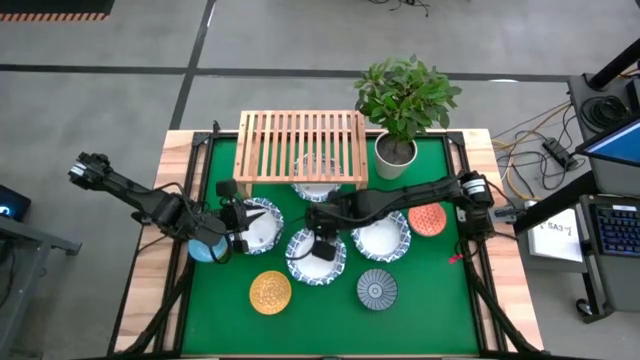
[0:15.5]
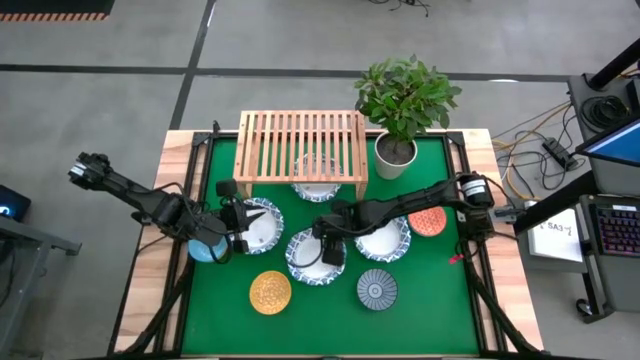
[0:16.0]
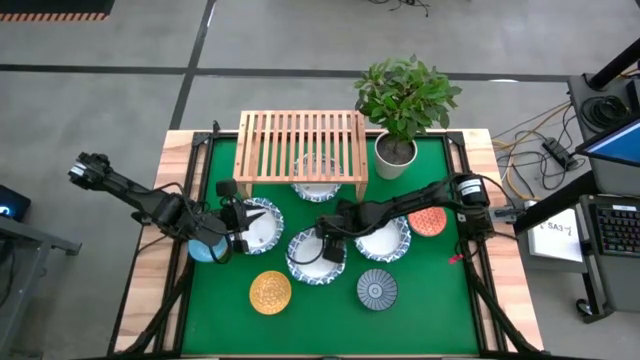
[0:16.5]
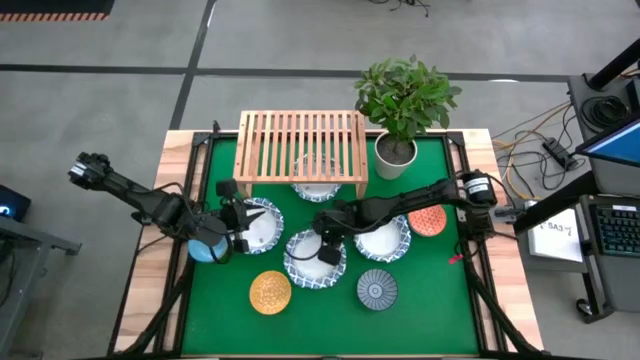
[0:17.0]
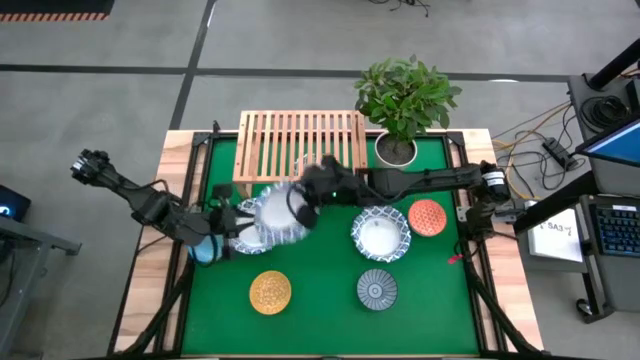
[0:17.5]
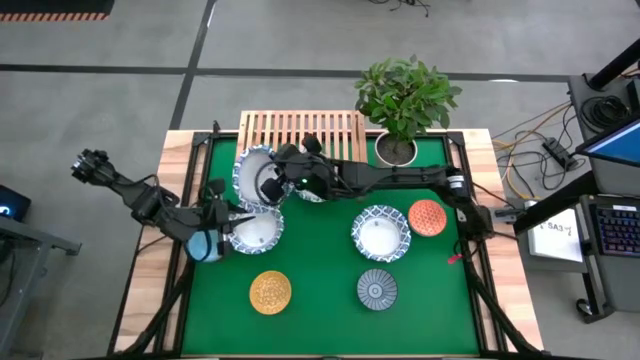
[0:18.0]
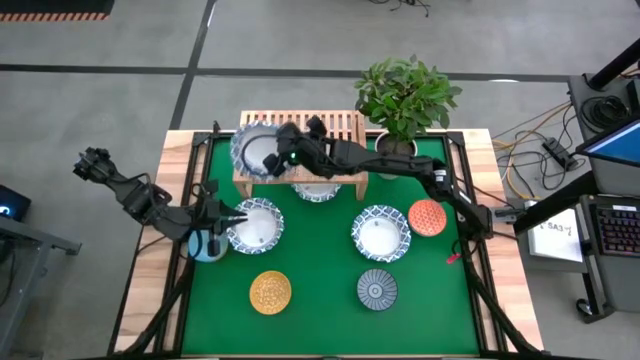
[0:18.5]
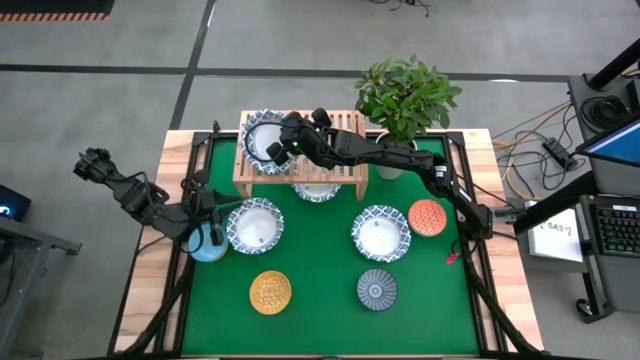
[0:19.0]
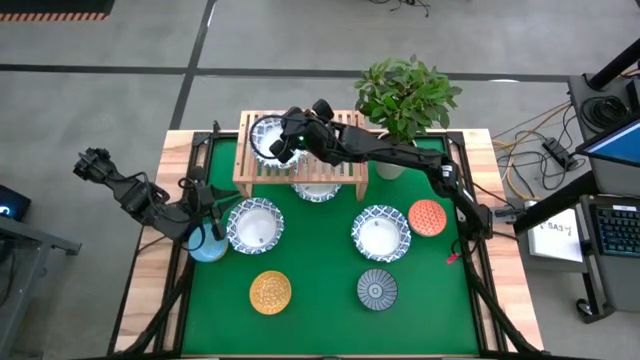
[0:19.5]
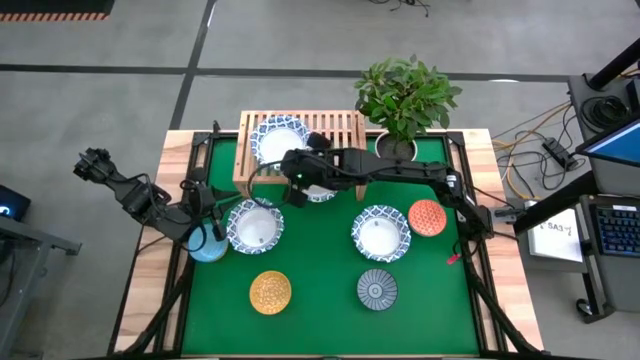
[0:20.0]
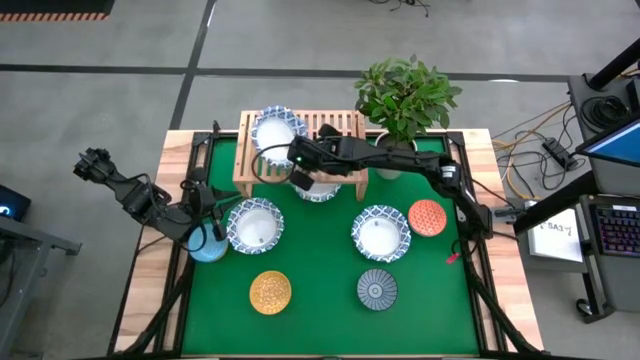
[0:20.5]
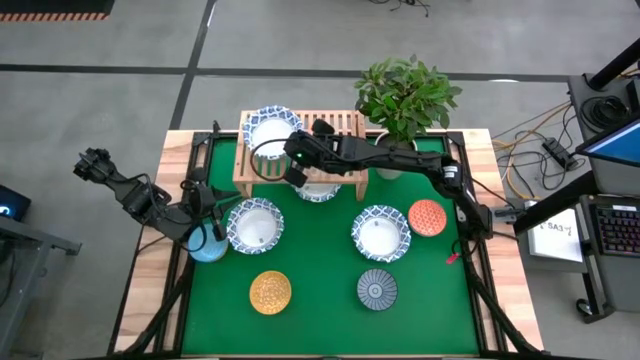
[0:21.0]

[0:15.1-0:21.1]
Task: Place and stack bowls onto a shelf
Put the white bowl on the shelf

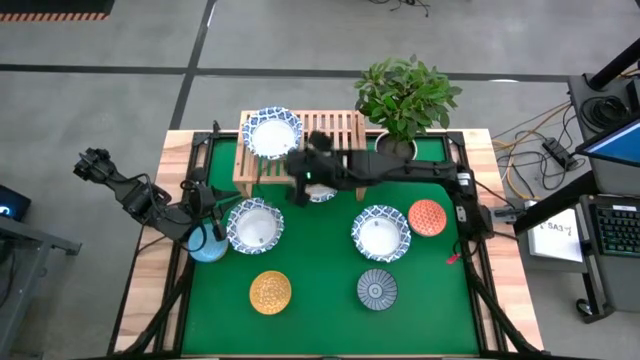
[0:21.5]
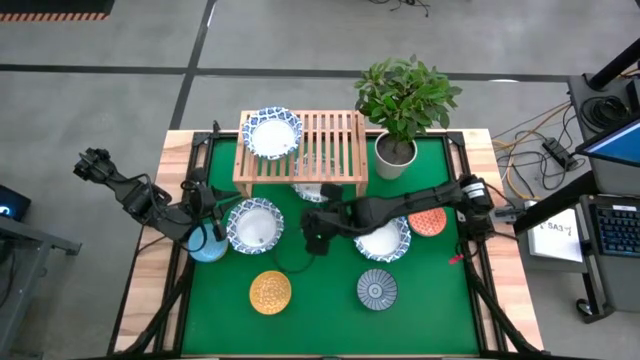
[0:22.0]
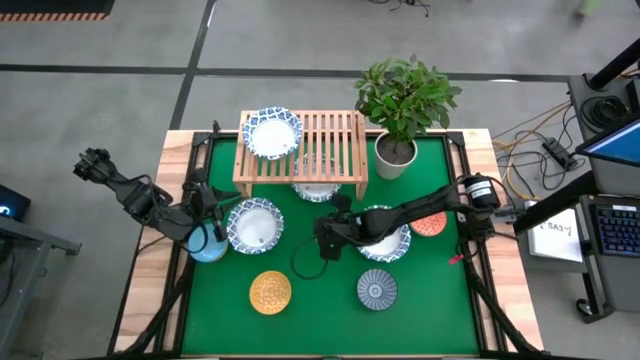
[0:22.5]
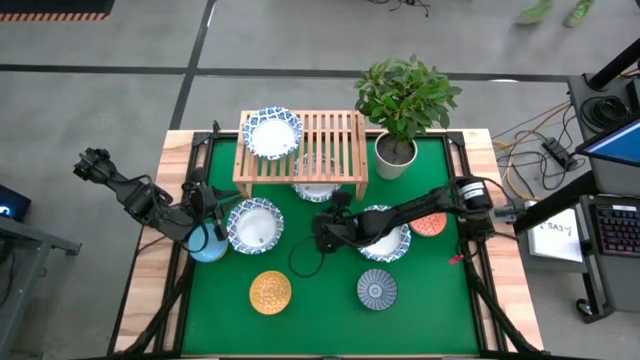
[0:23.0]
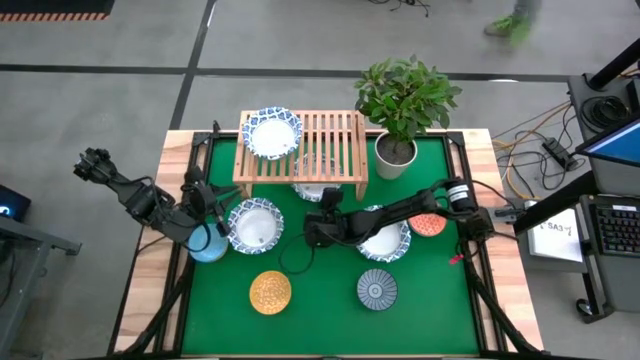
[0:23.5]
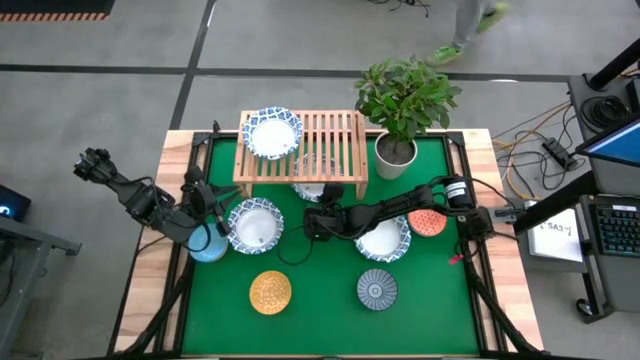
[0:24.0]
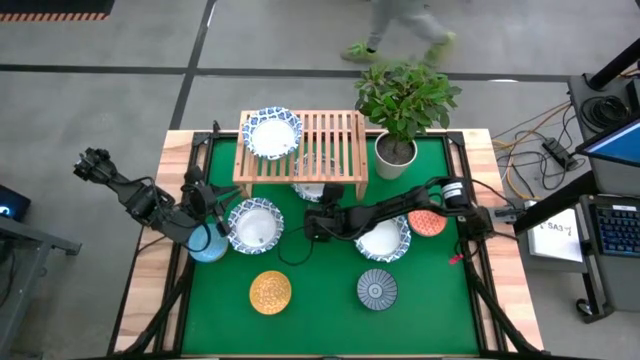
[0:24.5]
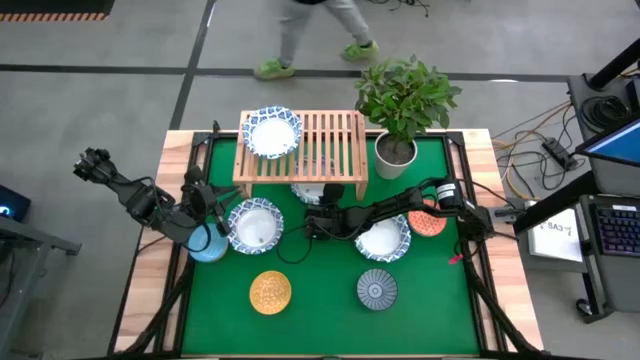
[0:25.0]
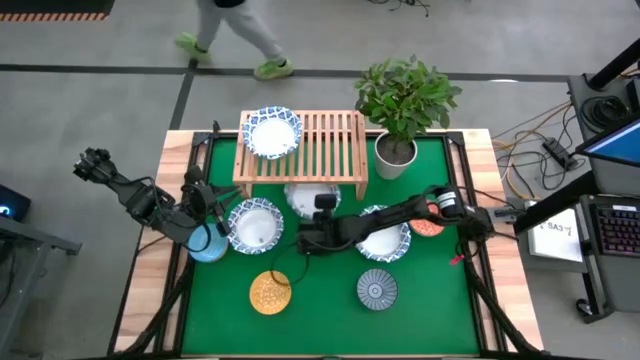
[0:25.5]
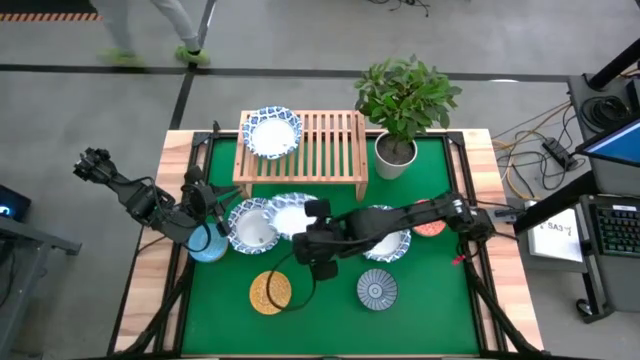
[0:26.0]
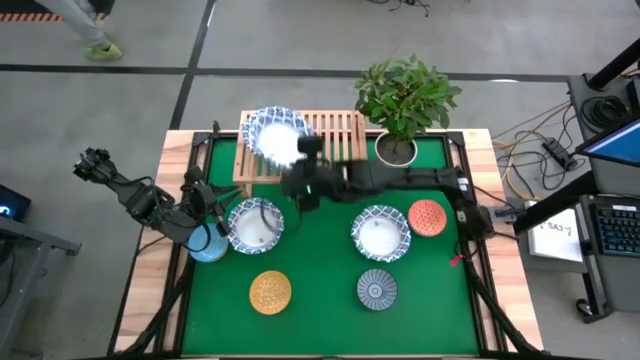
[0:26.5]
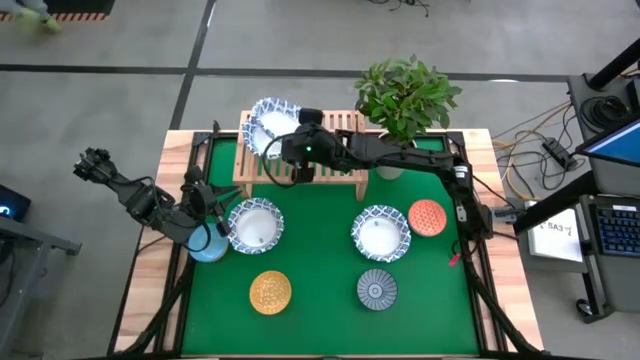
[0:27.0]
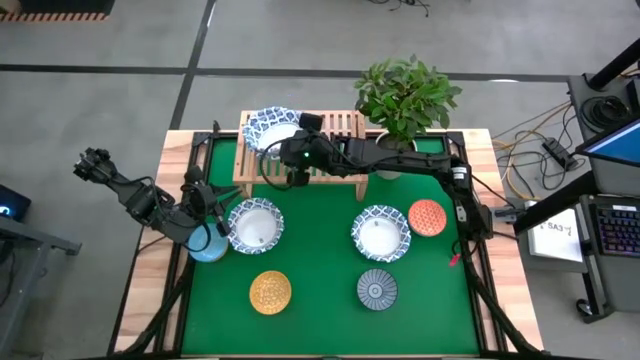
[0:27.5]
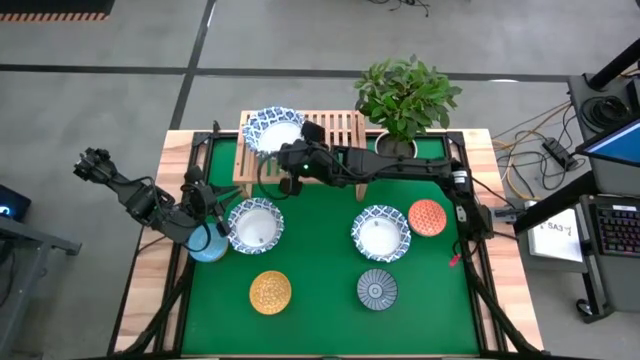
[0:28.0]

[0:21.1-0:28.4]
Stack the white bowl on top of the other white bowl on the shelf

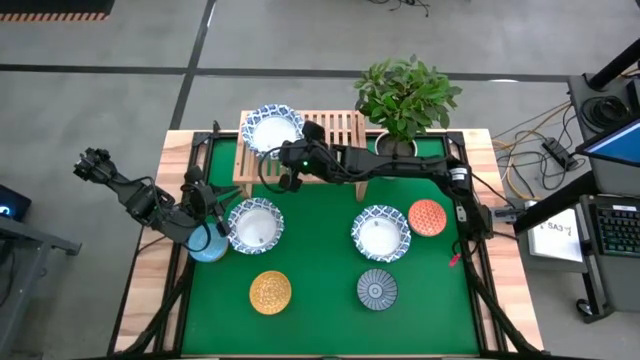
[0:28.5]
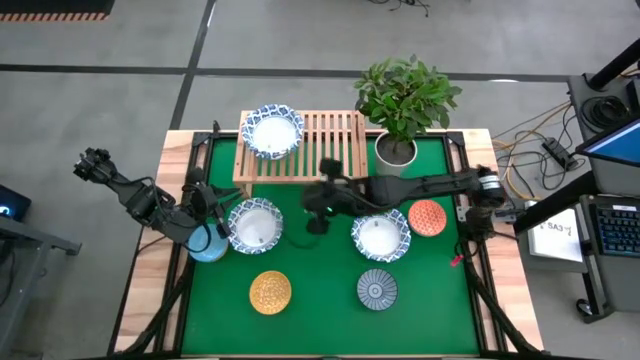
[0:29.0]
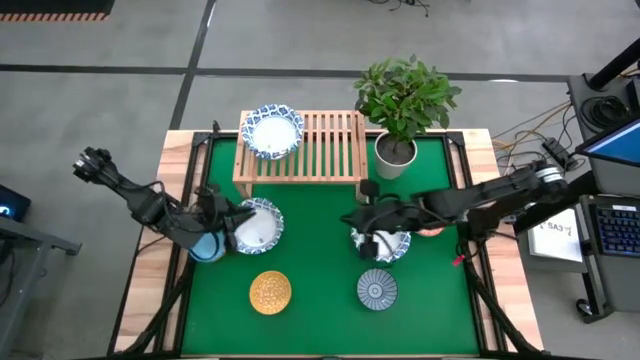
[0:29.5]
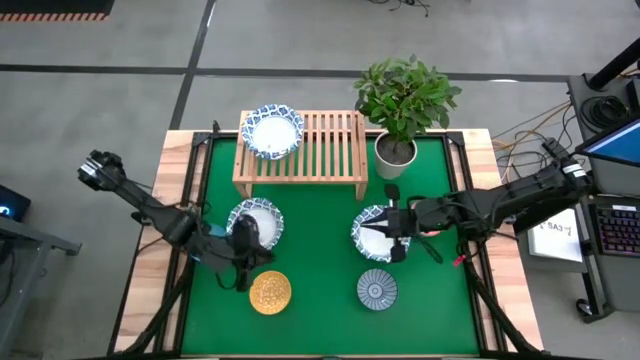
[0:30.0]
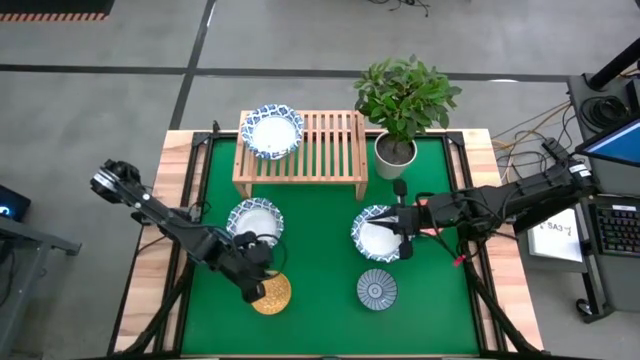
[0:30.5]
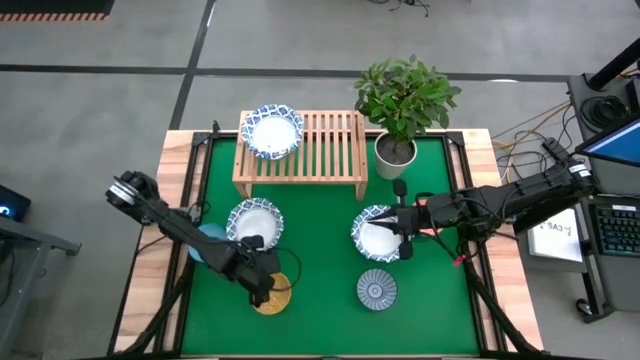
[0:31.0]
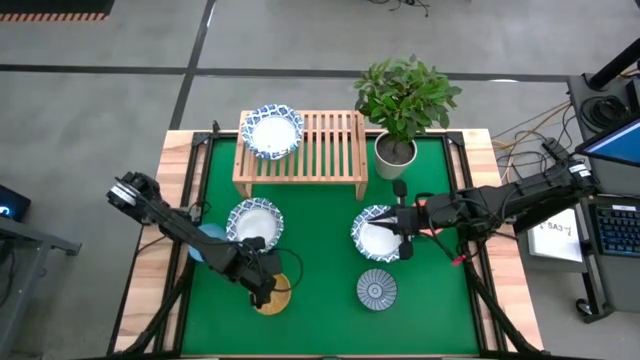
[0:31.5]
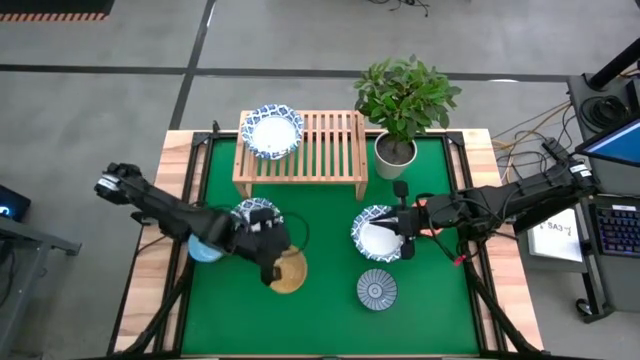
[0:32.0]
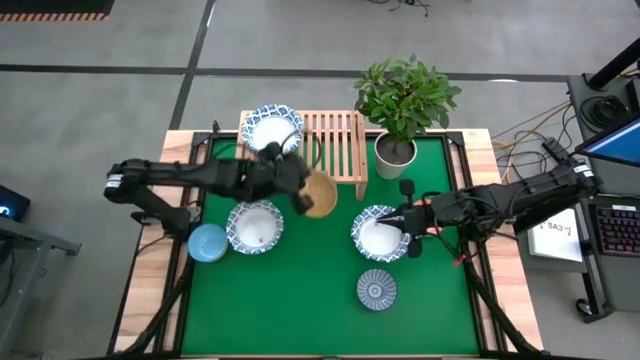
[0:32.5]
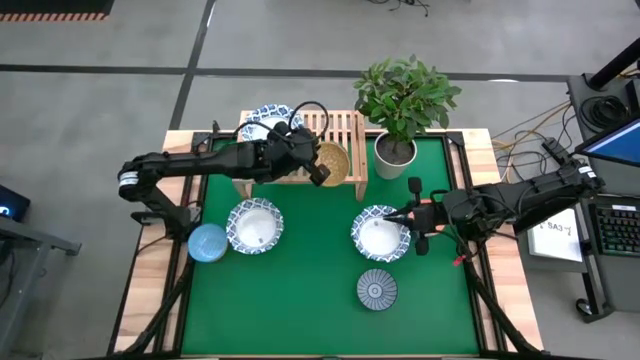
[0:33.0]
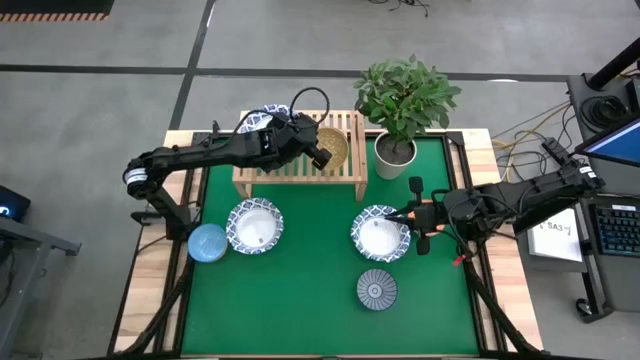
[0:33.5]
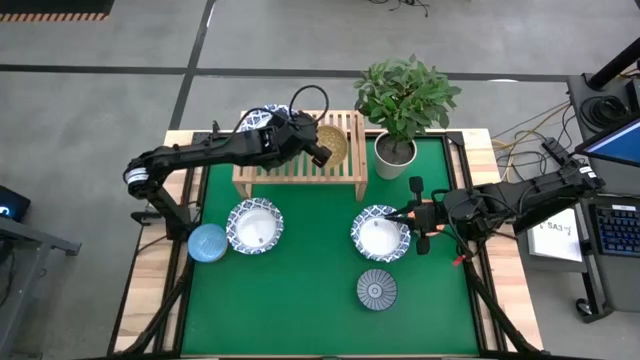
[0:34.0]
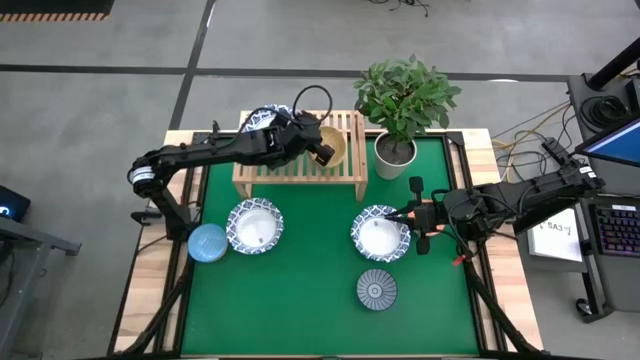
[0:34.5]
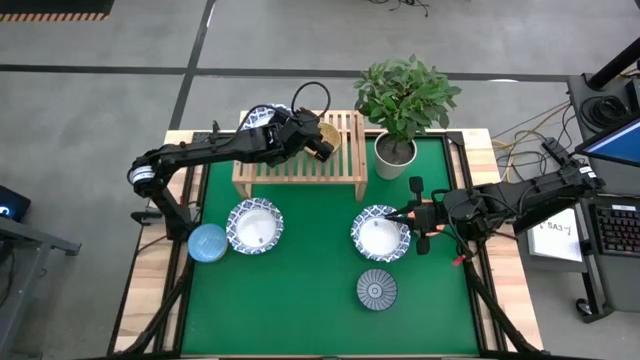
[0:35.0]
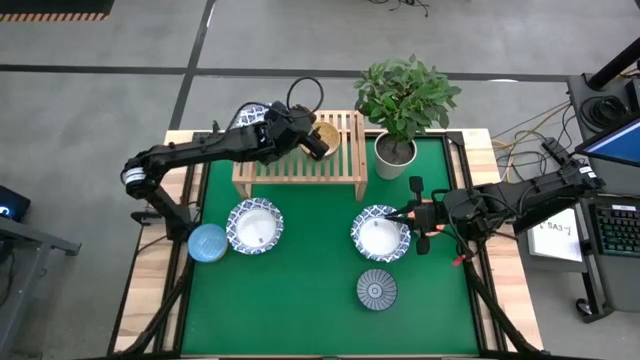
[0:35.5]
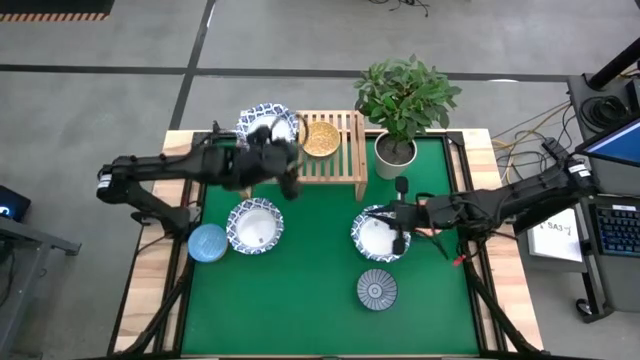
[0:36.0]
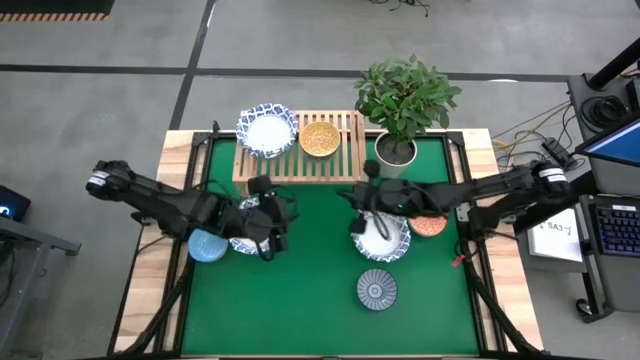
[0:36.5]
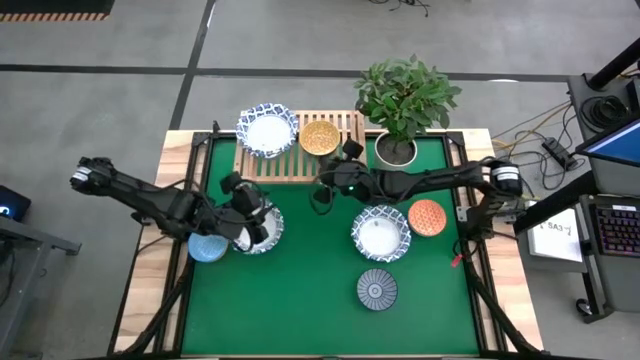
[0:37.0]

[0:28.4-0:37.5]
Put the yellow bowl on the shelf
